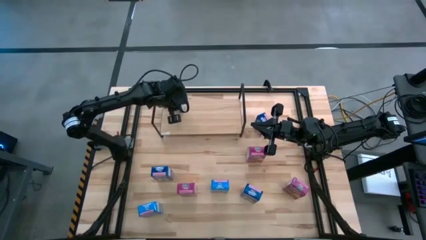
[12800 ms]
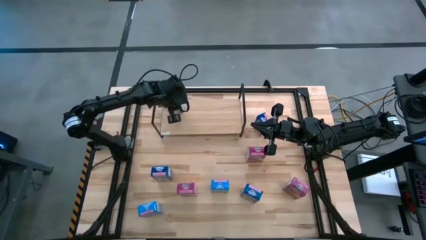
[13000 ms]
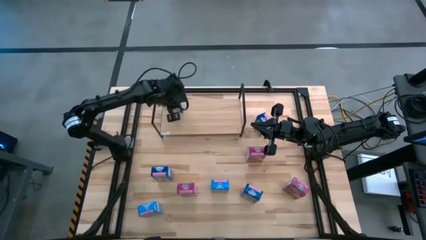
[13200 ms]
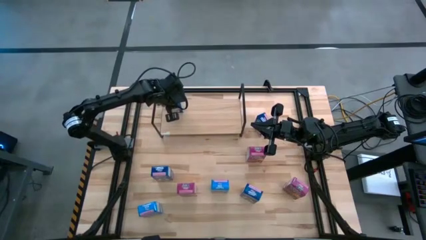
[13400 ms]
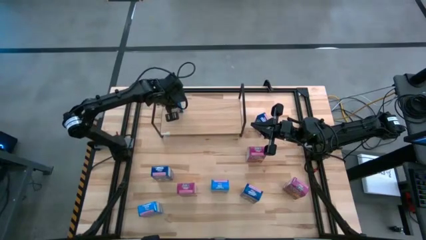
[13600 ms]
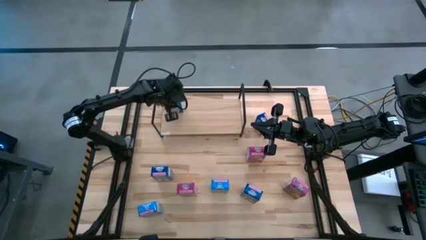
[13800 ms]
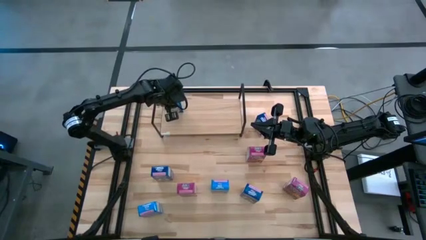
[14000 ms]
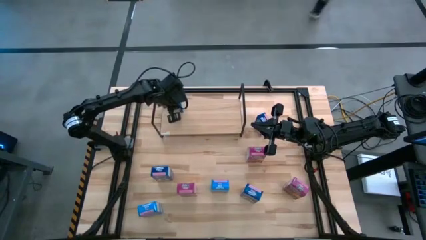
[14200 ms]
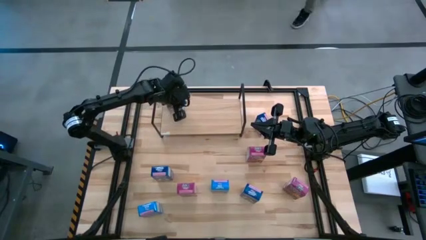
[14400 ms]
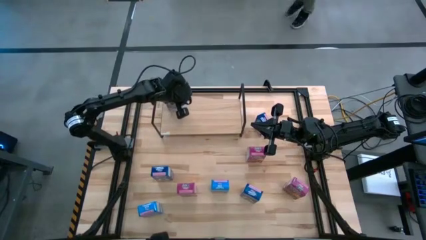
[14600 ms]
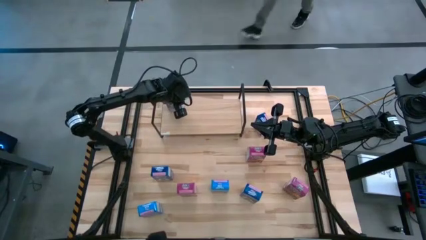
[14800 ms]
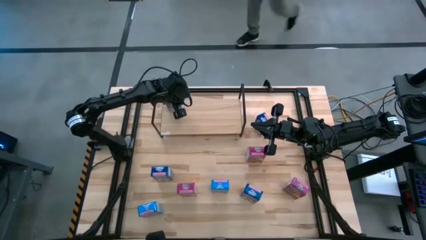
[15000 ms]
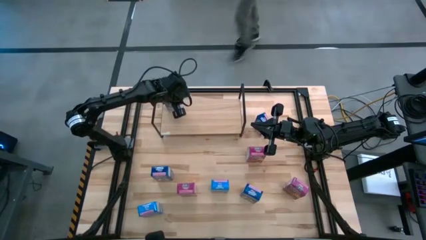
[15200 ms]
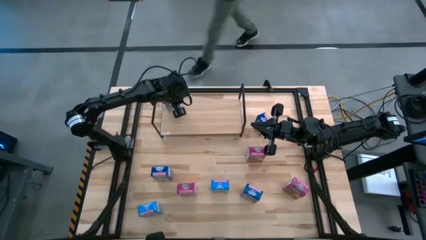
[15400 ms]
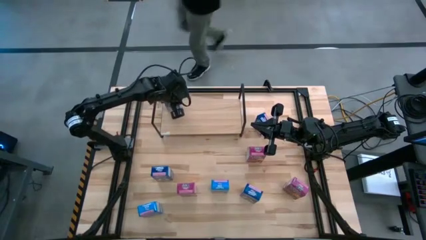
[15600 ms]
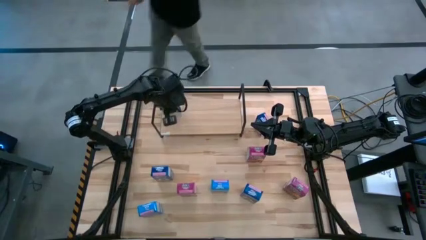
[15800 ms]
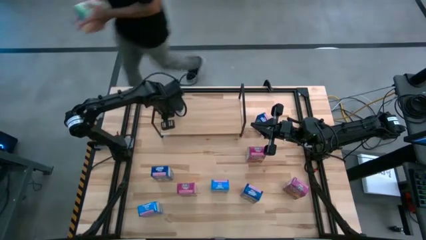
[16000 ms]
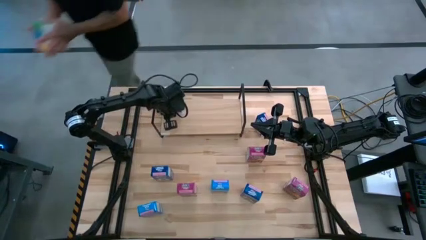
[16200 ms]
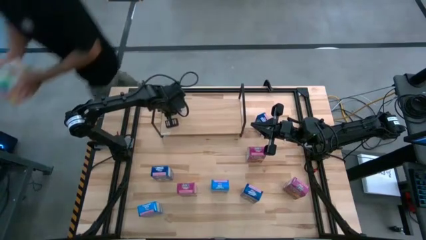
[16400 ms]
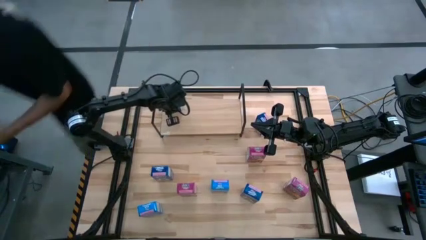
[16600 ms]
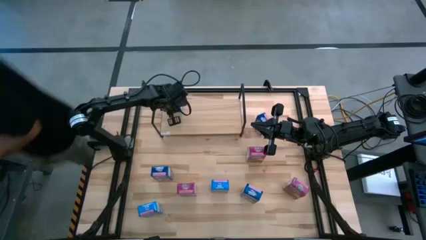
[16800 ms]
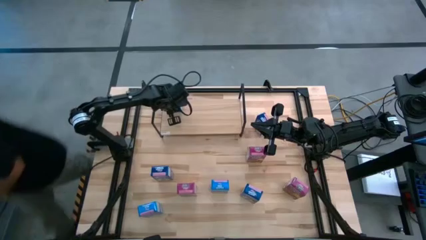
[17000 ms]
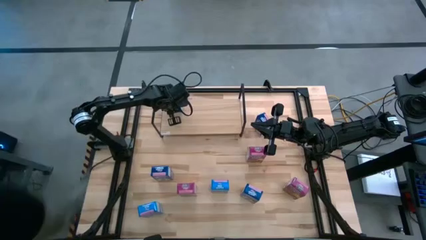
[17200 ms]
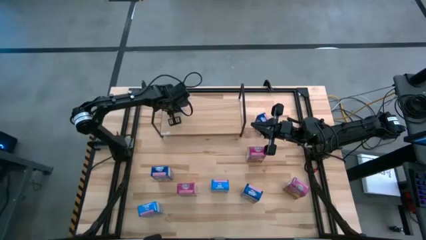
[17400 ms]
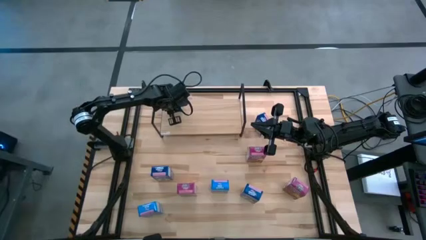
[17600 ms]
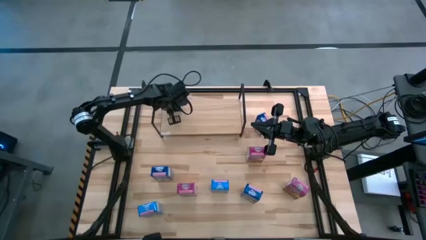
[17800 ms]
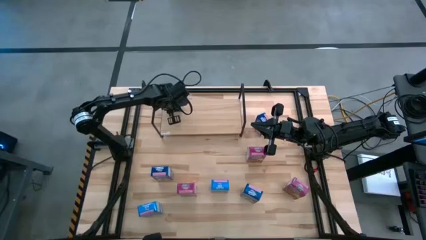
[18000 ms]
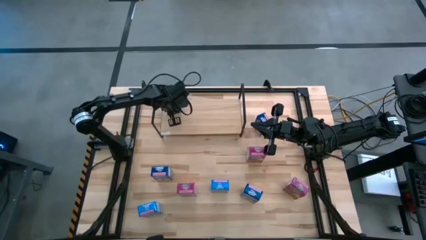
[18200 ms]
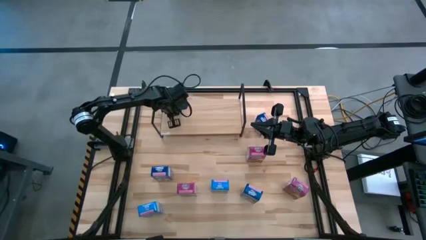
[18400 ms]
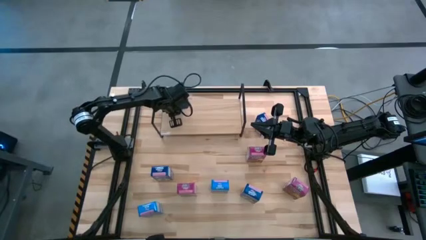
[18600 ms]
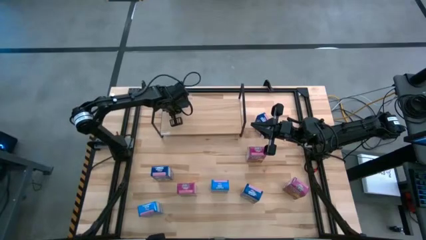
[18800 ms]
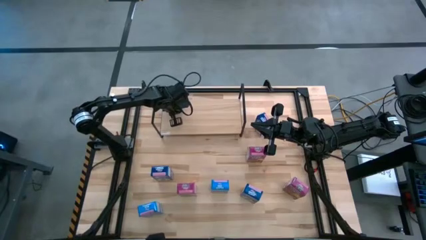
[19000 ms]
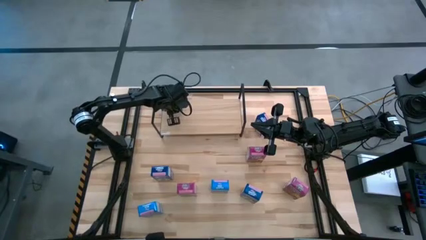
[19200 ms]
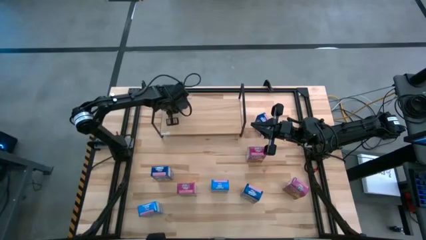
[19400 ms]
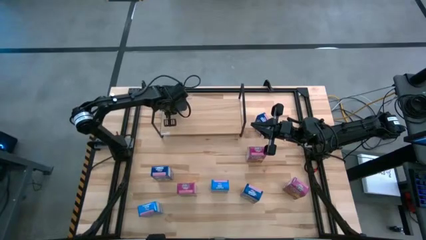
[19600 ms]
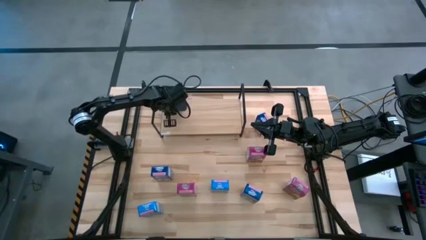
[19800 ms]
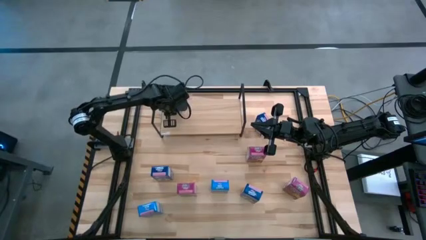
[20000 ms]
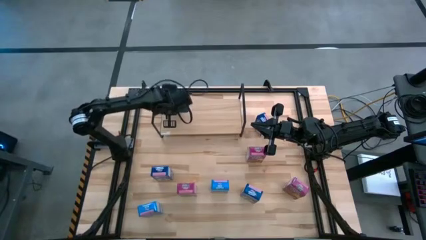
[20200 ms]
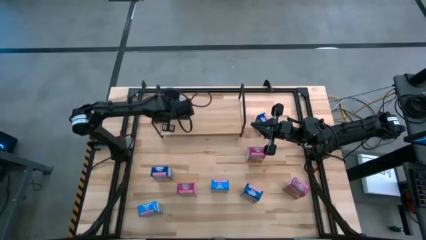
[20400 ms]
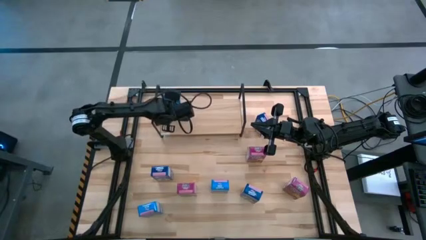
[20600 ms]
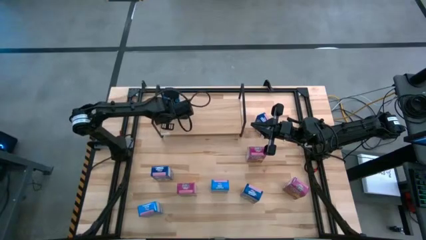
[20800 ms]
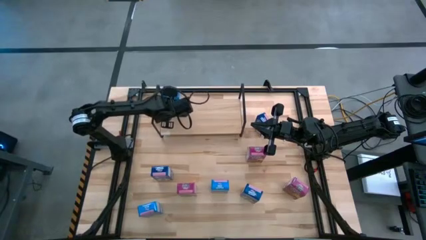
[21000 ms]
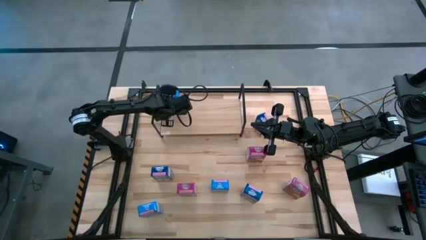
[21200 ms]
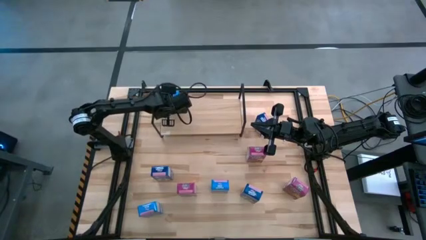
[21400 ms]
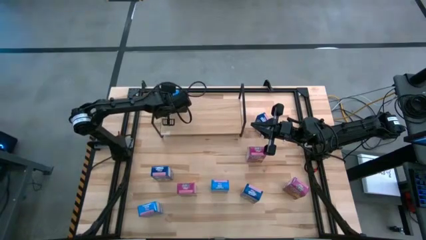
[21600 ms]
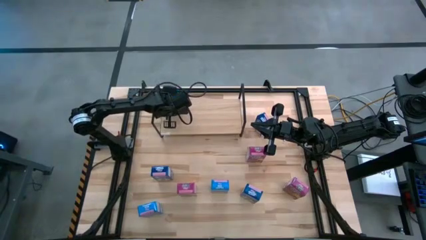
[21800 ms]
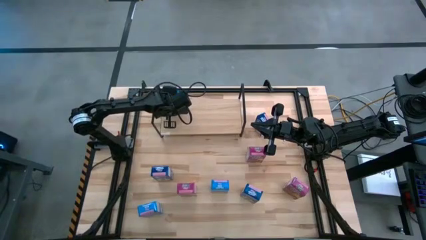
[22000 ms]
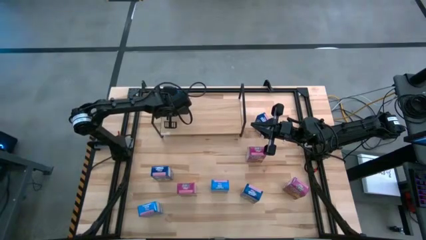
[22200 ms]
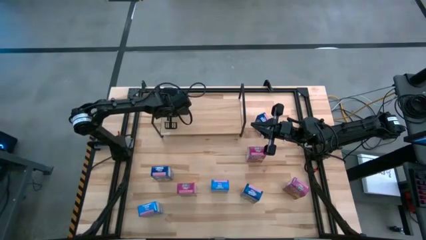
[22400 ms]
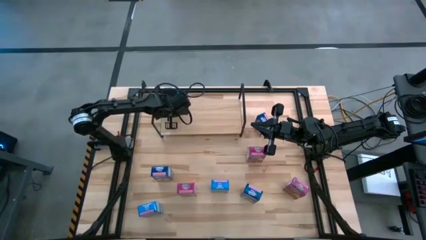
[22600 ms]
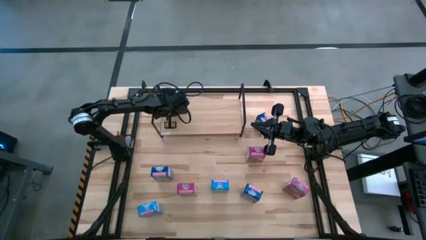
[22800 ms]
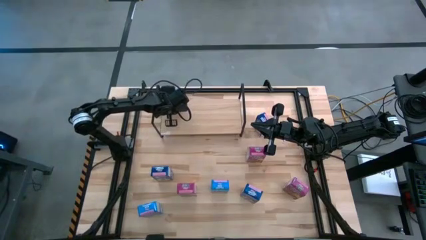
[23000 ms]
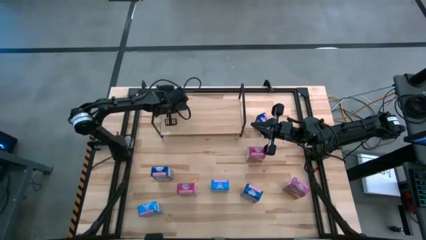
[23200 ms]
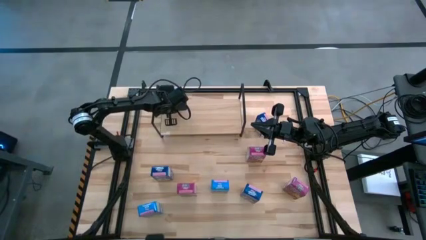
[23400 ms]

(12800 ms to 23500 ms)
Task: Stack cereal on shelf
Put the top light blue cereal box on the shelf

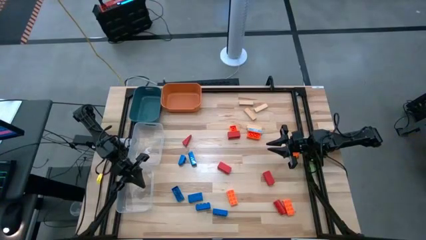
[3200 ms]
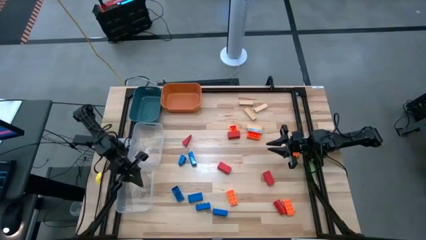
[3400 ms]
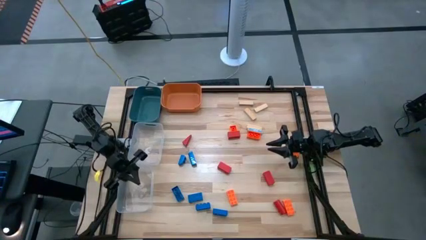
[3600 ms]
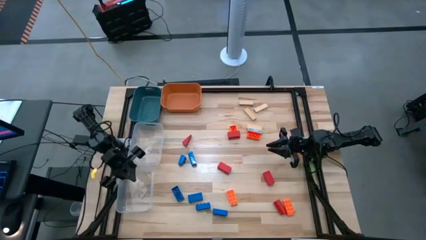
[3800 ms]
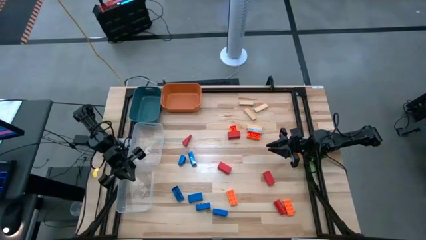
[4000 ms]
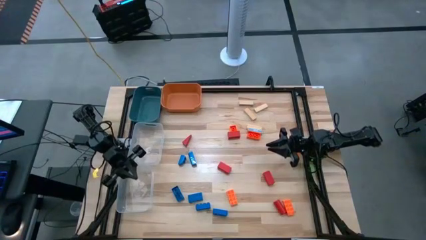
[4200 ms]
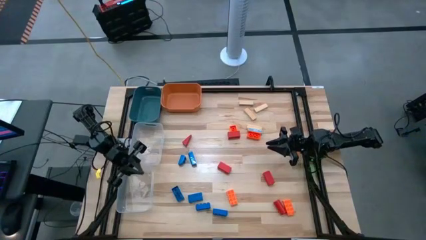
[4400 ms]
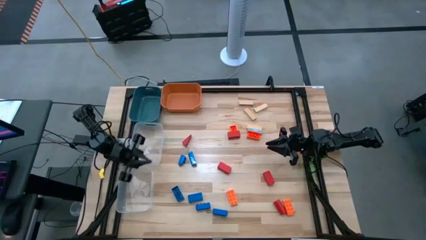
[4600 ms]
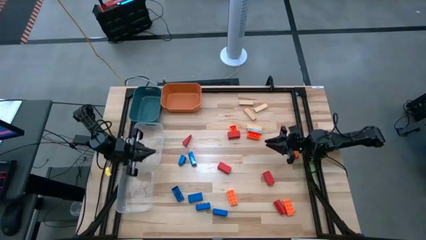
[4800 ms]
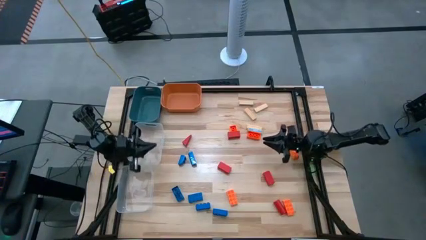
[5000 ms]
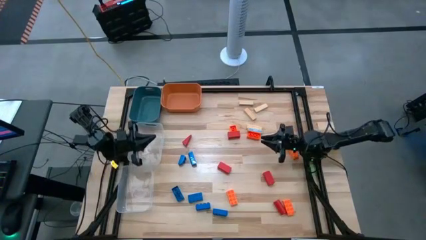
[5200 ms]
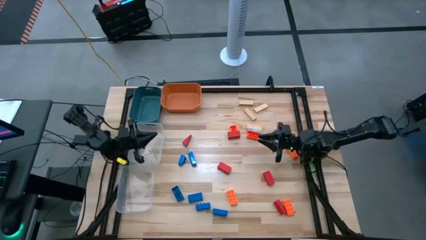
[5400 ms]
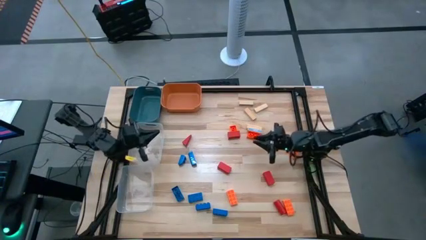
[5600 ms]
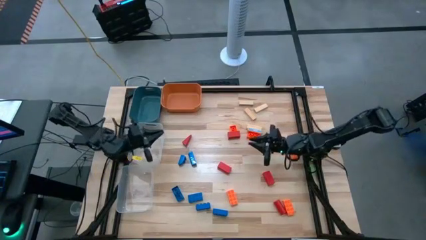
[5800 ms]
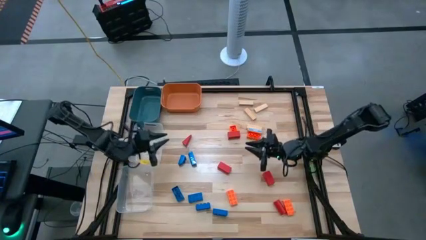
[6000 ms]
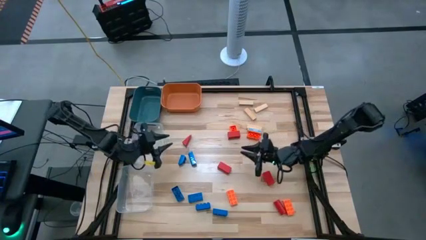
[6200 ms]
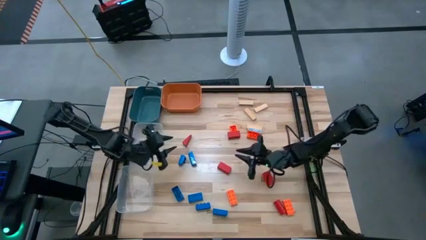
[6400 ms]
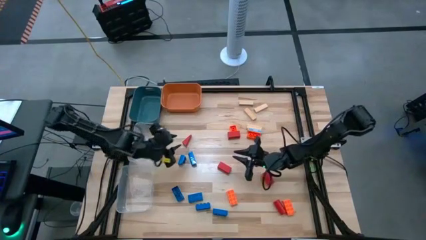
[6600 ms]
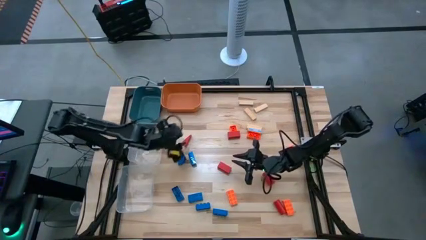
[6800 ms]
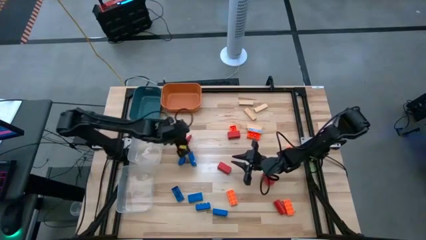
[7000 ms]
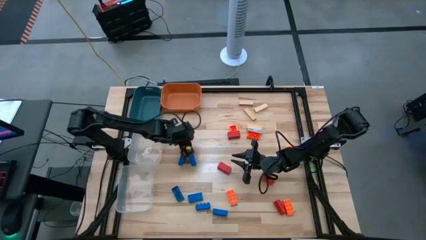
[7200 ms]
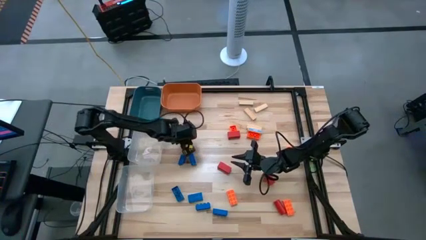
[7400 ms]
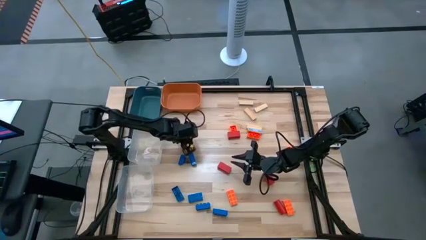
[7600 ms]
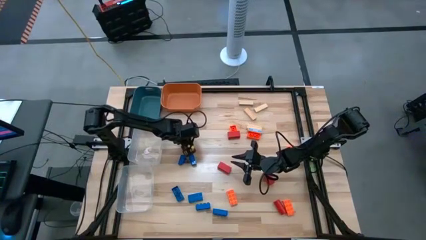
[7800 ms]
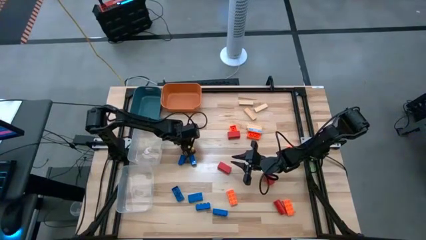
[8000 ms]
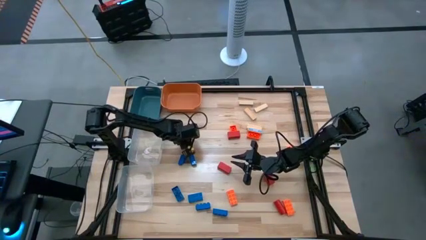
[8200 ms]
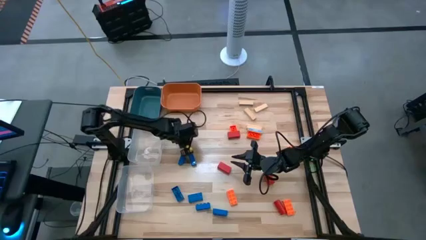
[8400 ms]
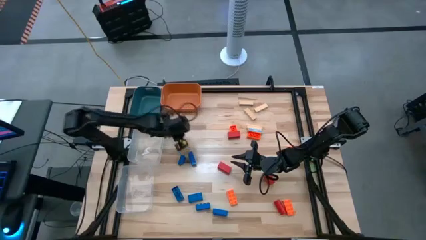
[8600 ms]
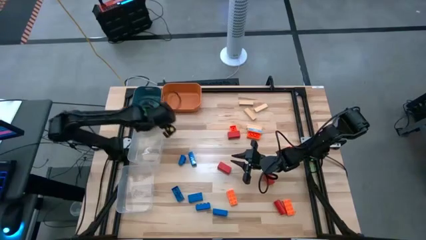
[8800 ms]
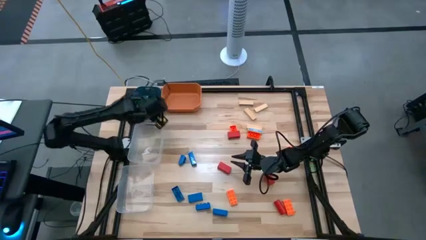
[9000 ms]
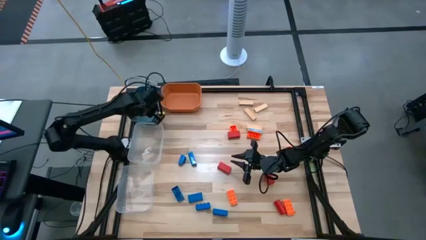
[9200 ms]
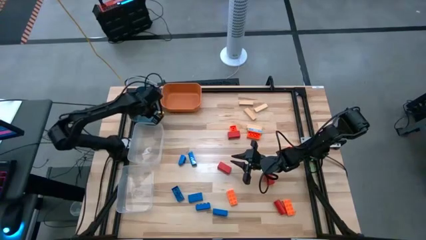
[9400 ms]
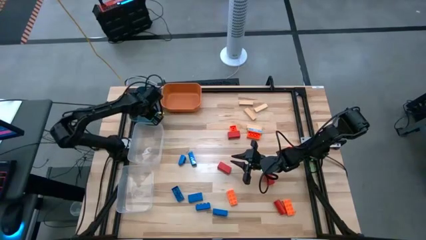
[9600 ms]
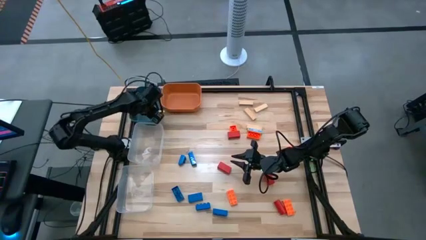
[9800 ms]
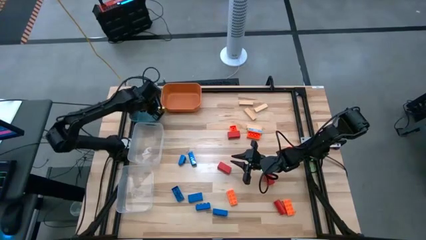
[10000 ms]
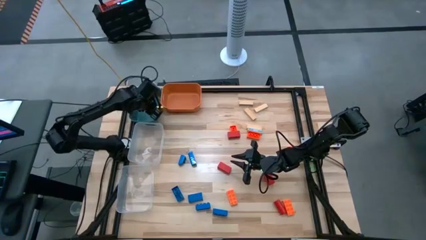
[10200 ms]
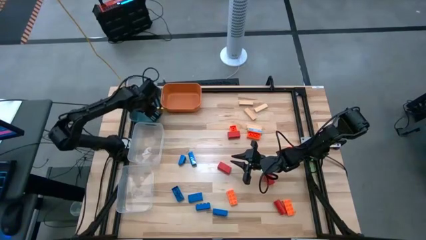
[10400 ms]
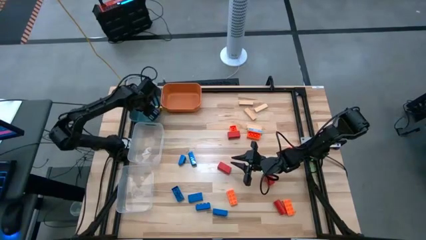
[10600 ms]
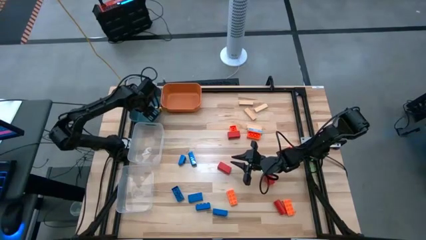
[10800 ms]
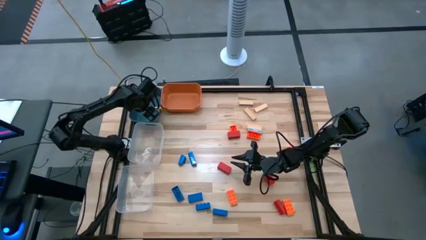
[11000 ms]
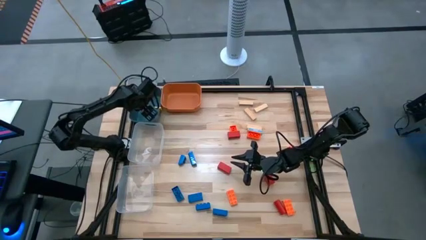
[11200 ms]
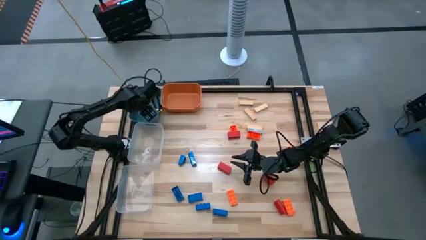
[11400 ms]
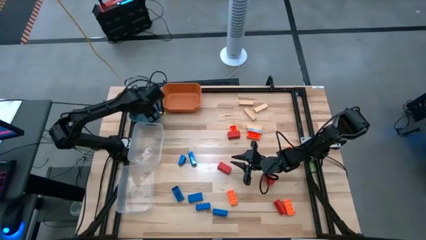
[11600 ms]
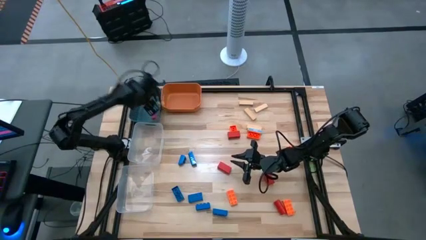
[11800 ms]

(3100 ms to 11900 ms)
Task: Sort blocks
Put the wooden red block into the blue bin
